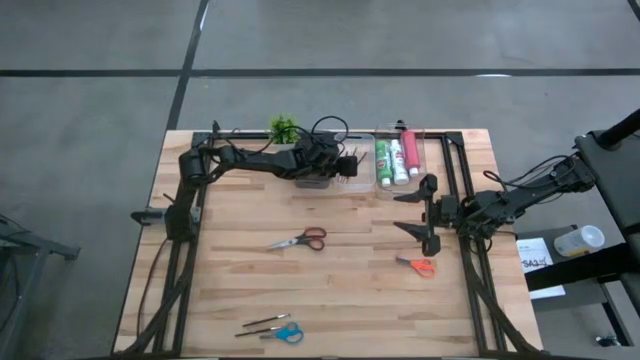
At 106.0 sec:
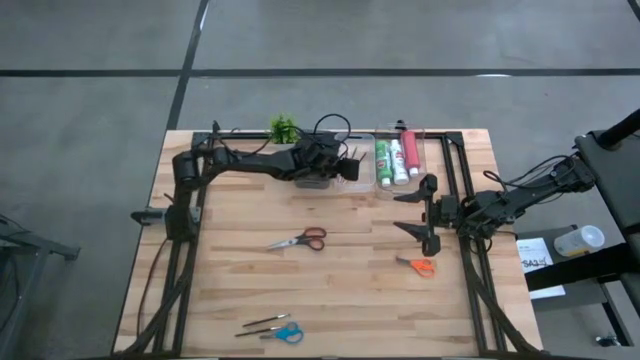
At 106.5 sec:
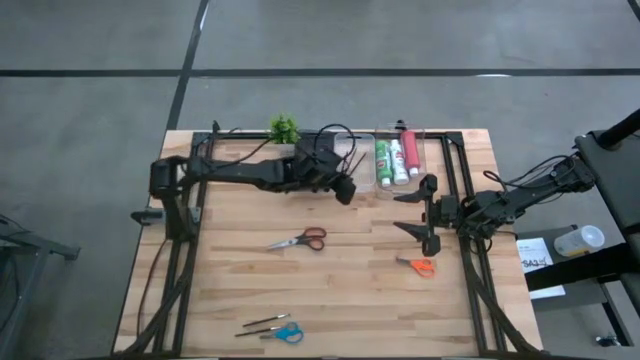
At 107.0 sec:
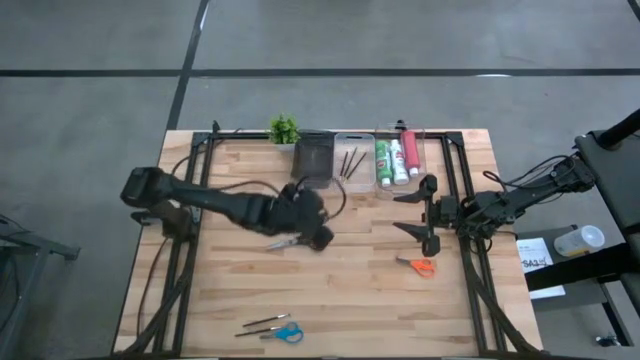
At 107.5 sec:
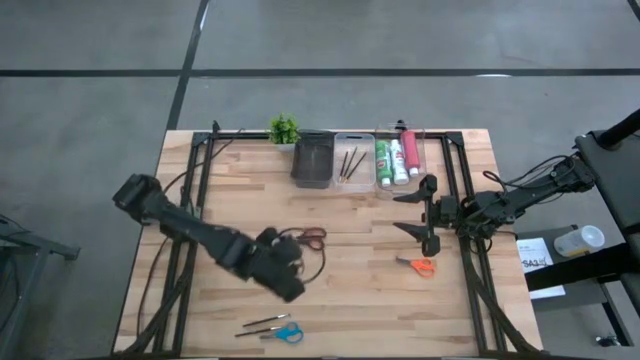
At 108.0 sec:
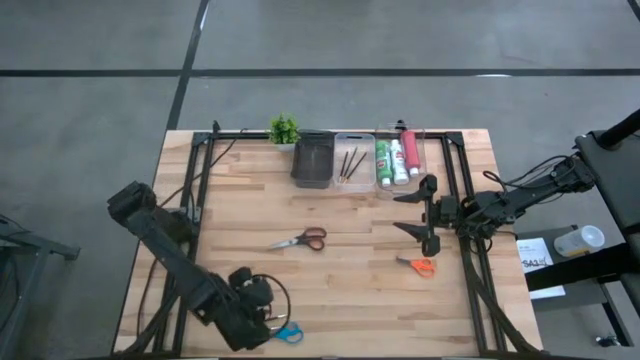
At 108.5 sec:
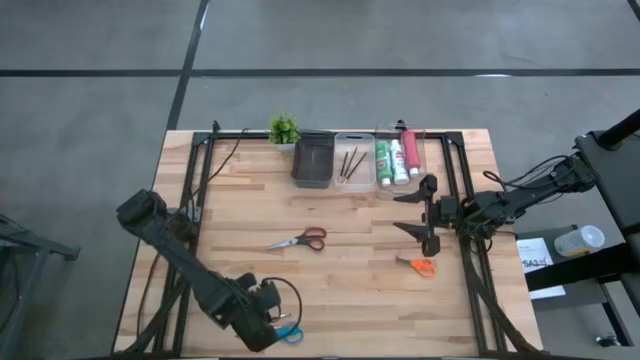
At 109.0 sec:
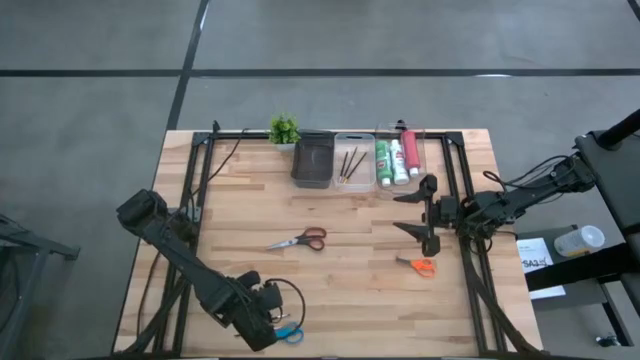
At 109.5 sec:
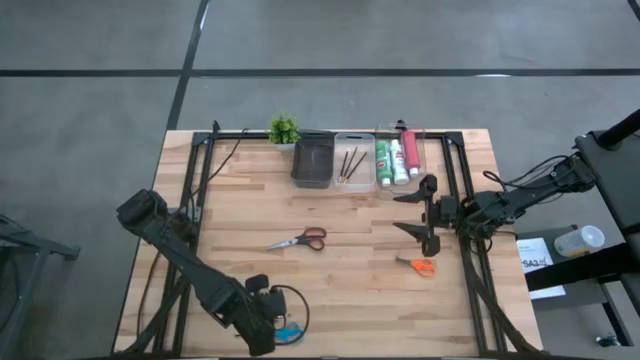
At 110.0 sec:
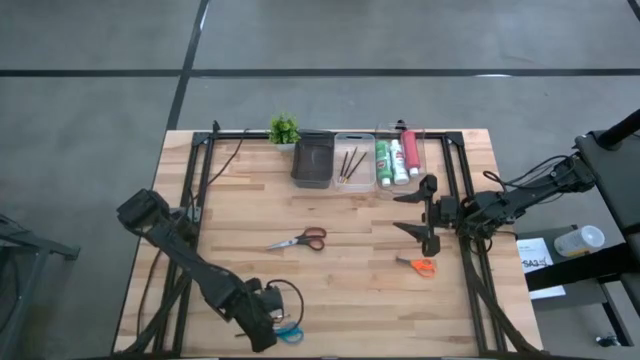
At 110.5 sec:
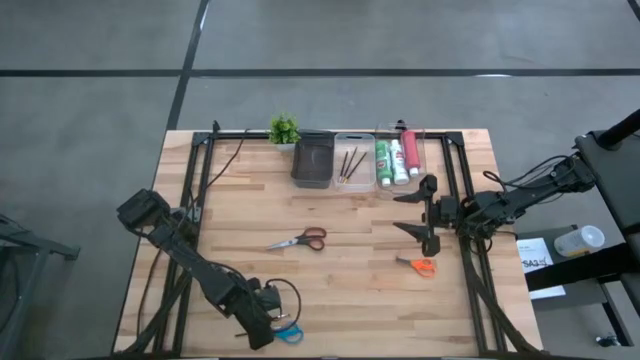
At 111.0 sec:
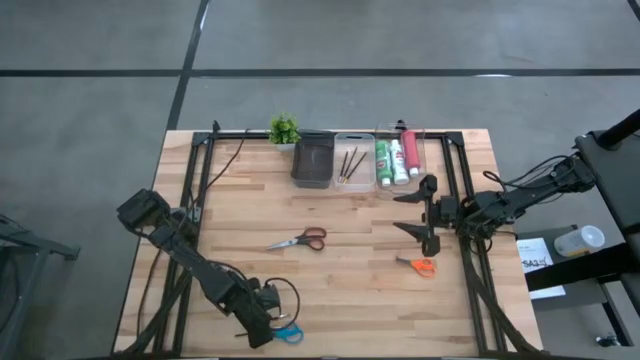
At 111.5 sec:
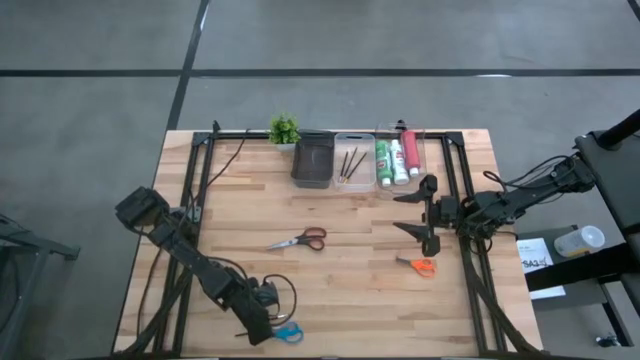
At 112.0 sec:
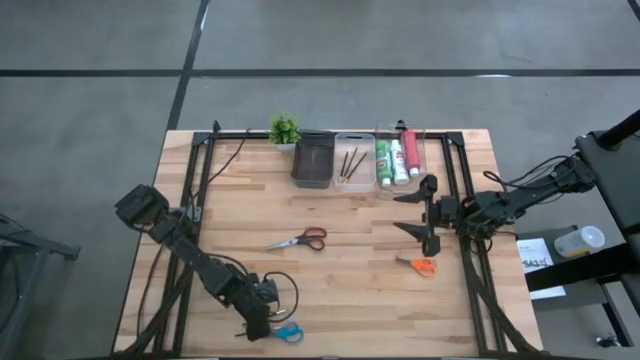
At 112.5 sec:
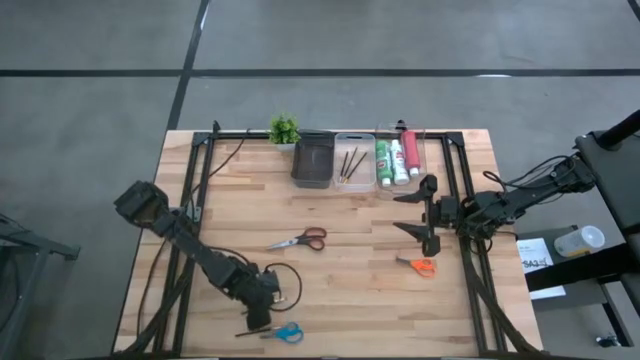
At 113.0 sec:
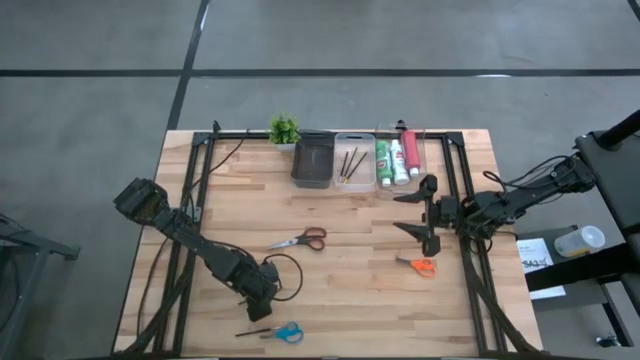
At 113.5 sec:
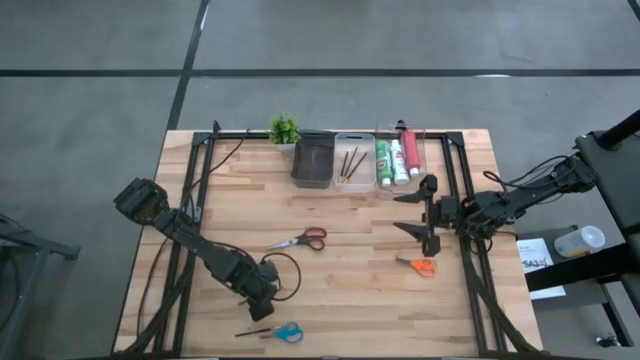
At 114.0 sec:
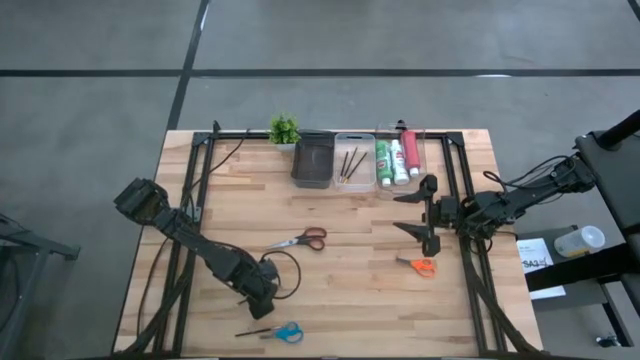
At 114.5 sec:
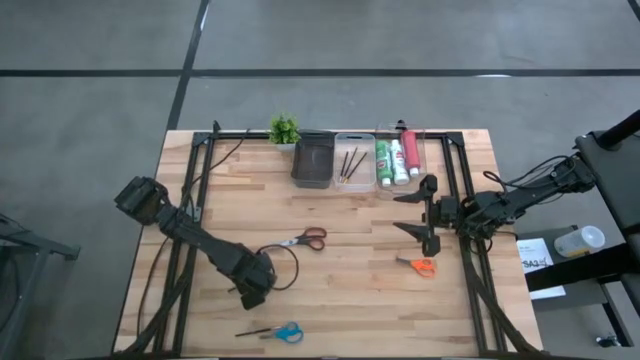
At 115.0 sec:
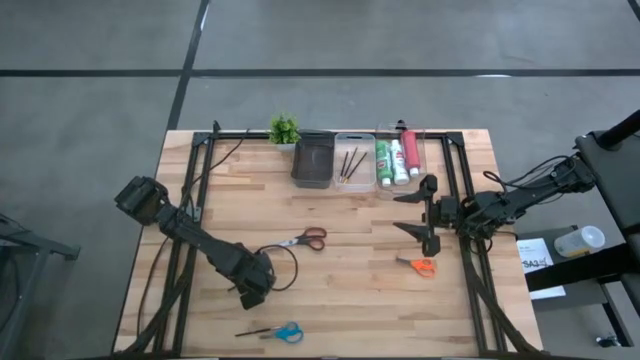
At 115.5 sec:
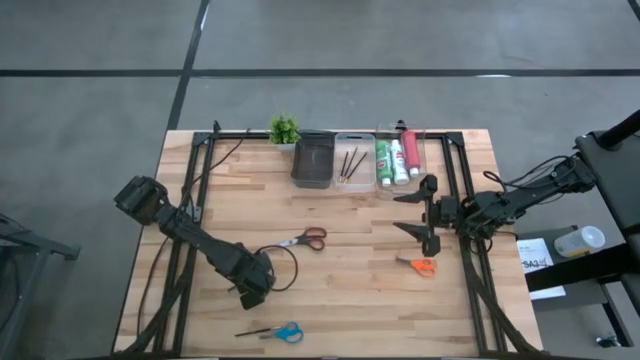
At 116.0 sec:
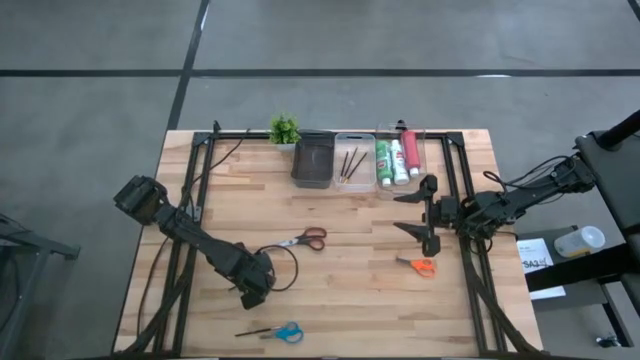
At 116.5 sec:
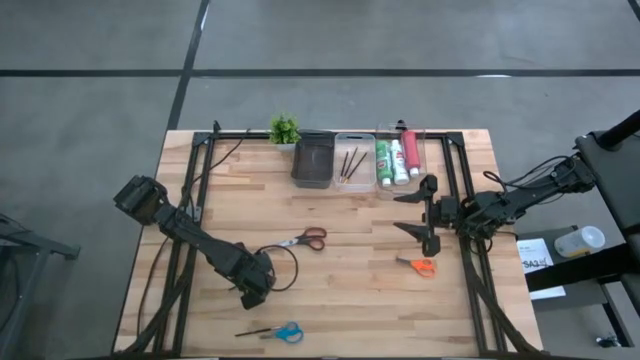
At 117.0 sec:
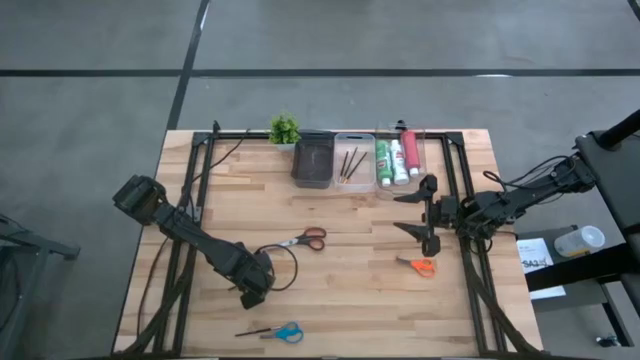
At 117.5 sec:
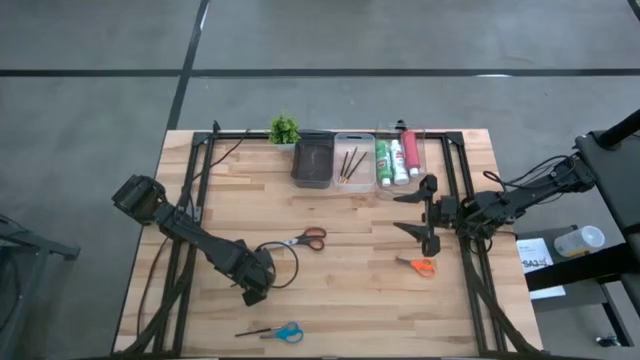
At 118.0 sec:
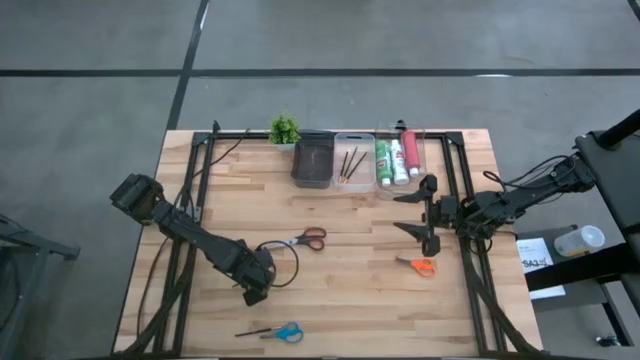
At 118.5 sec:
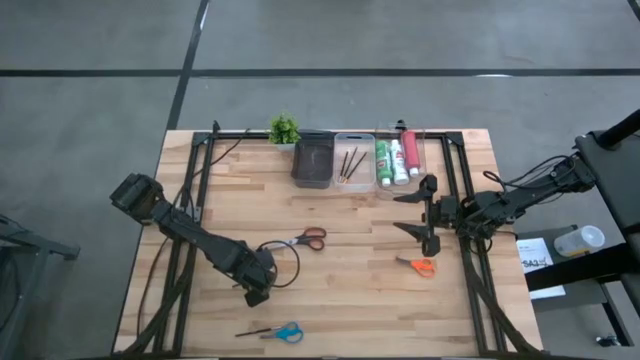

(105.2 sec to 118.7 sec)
Task: Pick & Place Paint Supplies
Put the top silver paint brush into the white transparent bin

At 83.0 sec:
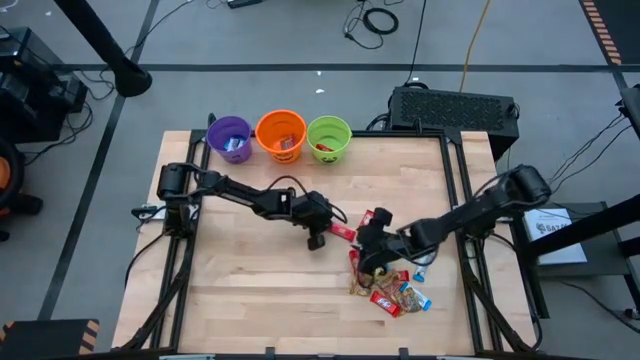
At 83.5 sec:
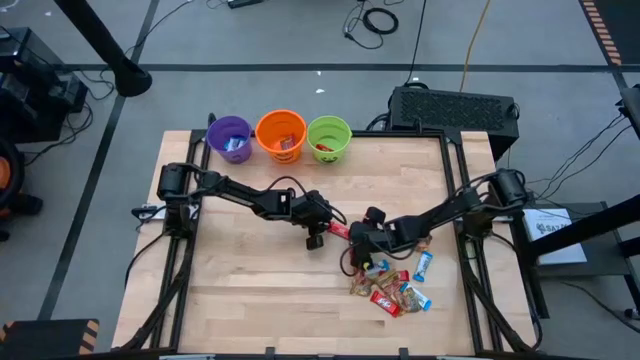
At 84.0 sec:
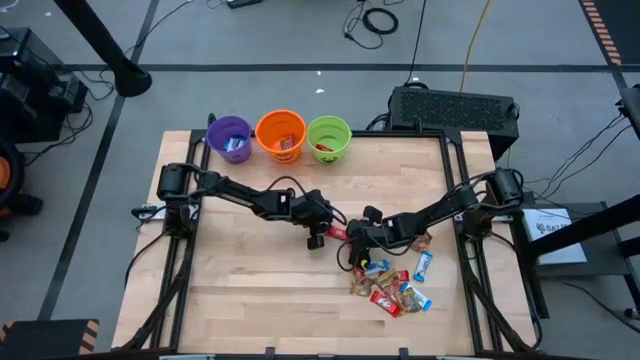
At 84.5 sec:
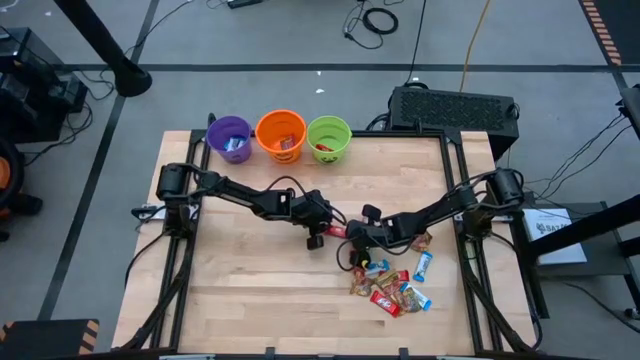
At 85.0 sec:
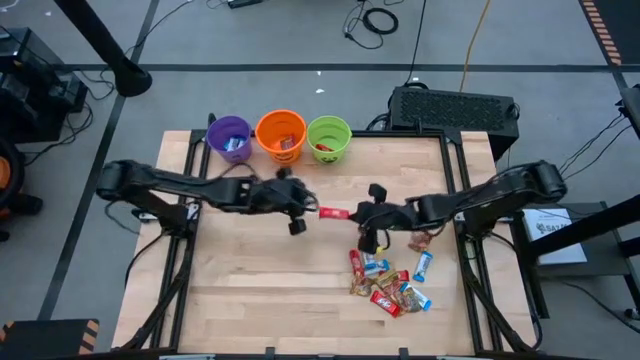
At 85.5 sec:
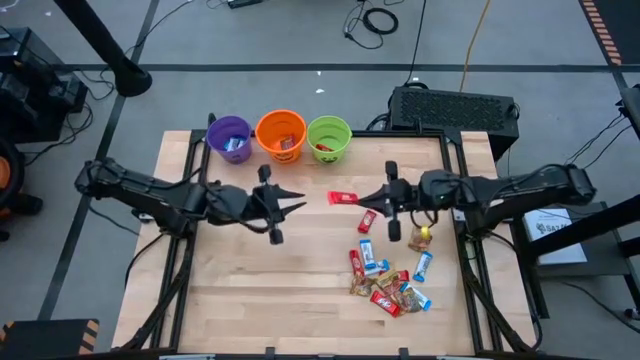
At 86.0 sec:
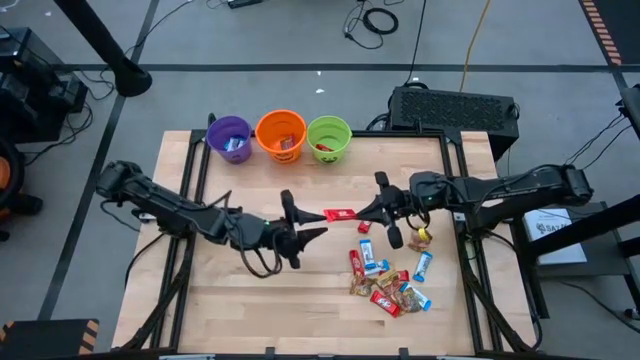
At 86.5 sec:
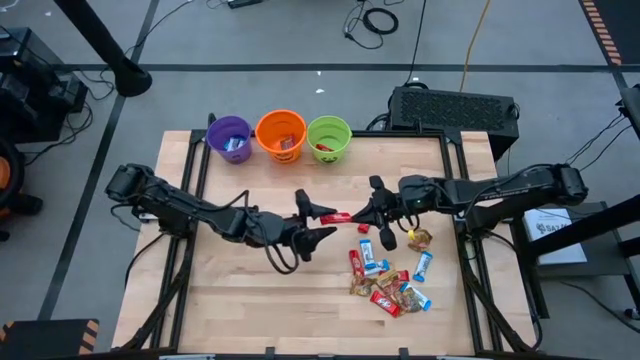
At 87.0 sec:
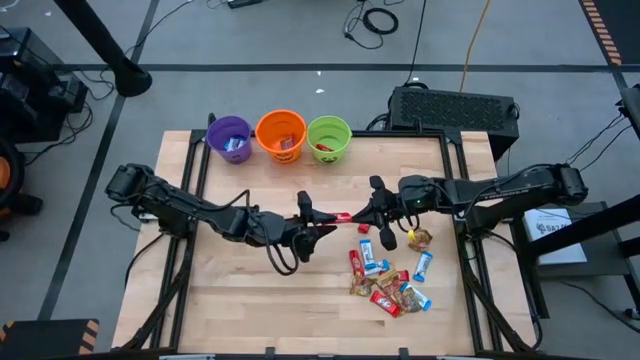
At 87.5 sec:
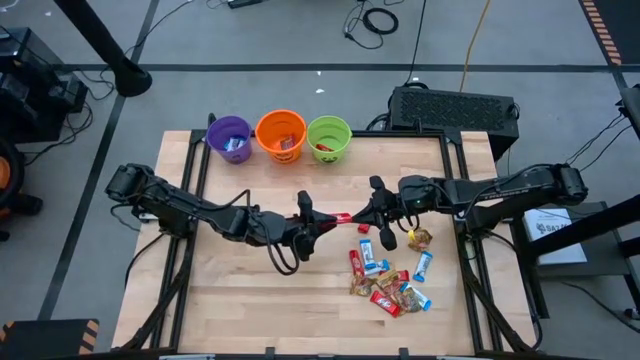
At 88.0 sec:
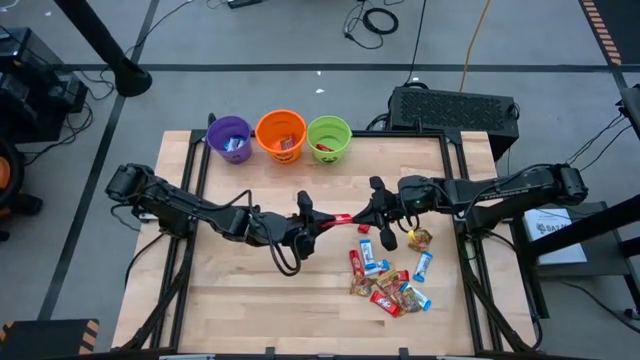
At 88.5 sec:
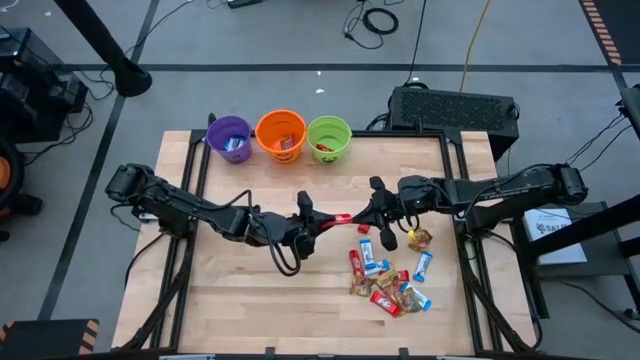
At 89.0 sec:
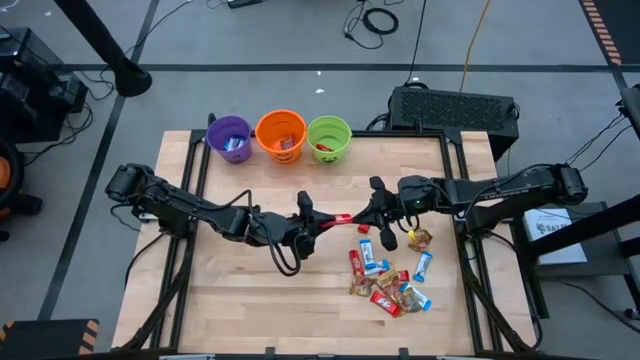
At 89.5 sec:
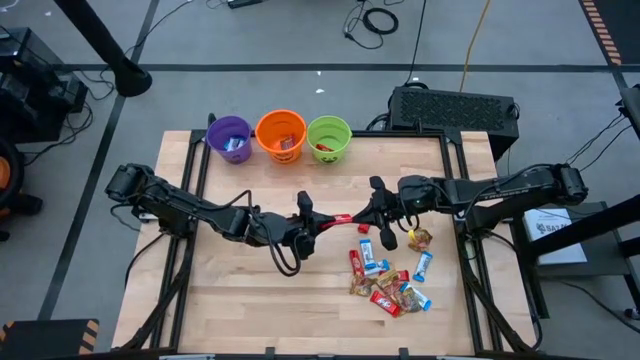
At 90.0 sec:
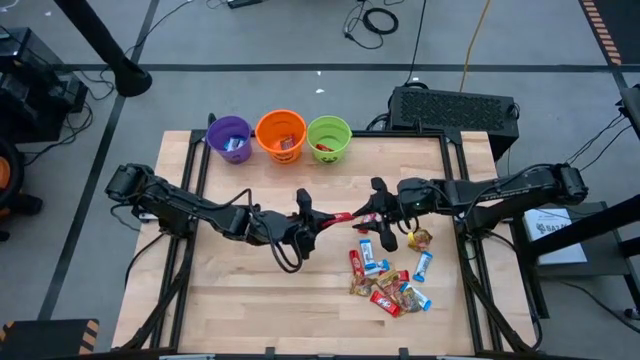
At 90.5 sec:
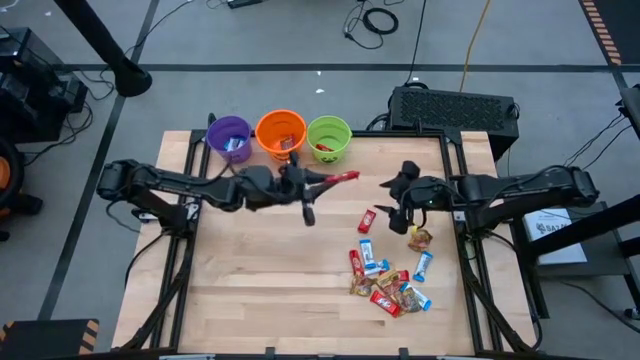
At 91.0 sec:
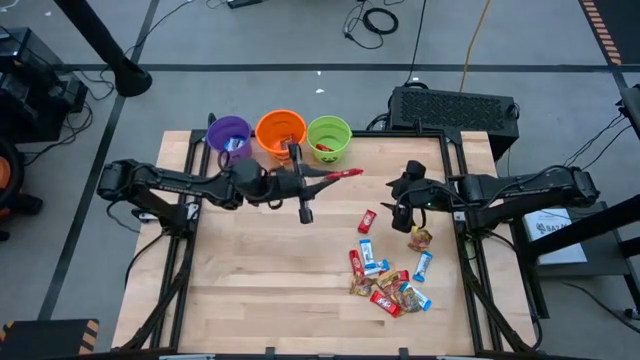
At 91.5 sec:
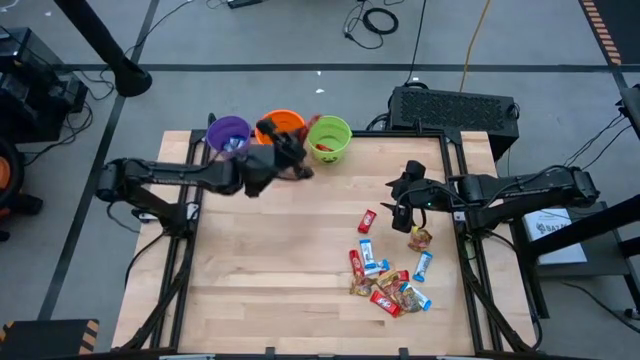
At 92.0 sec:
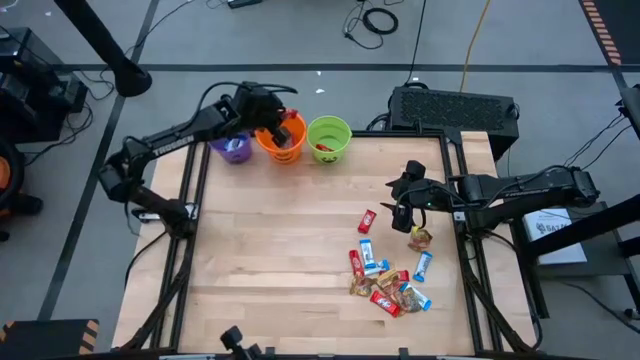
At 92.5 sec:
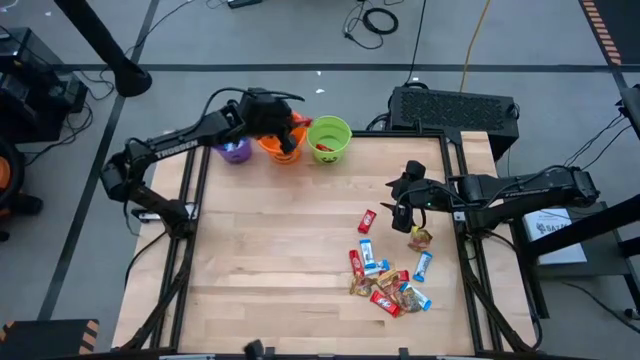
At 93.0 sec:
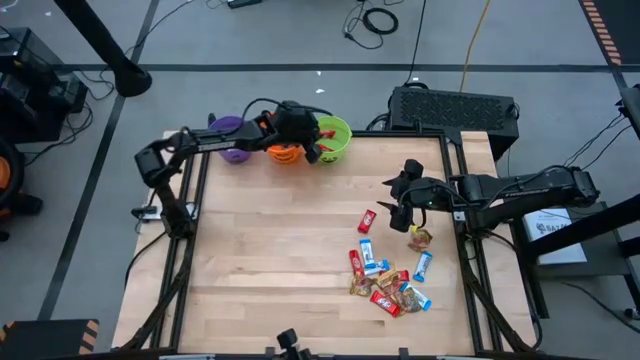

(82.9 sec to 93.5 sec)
Task: Sort candy by brand, put in halloween buckets
Put the red chocolate bar into the green bucket
